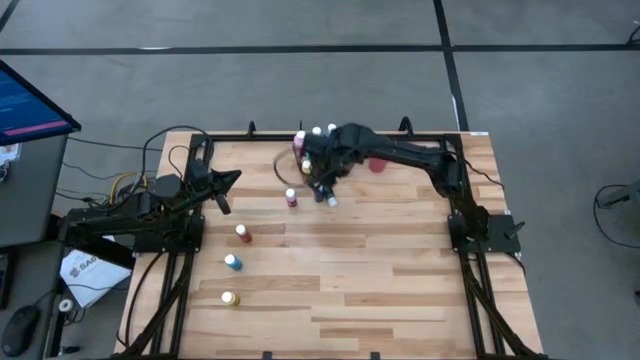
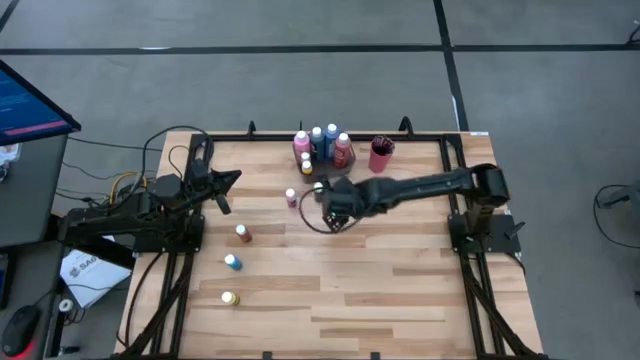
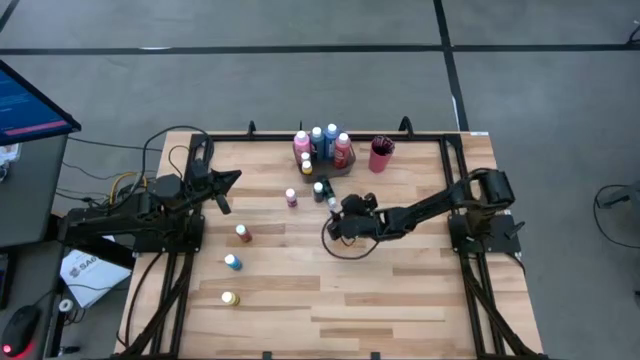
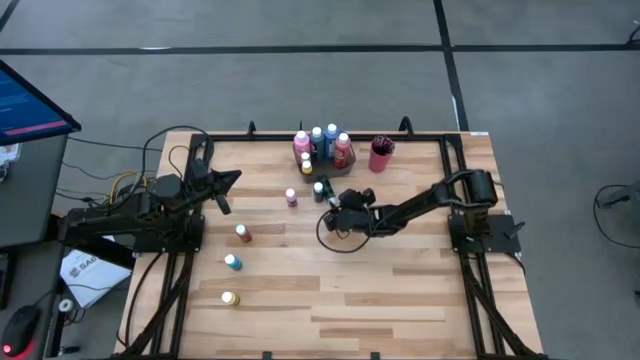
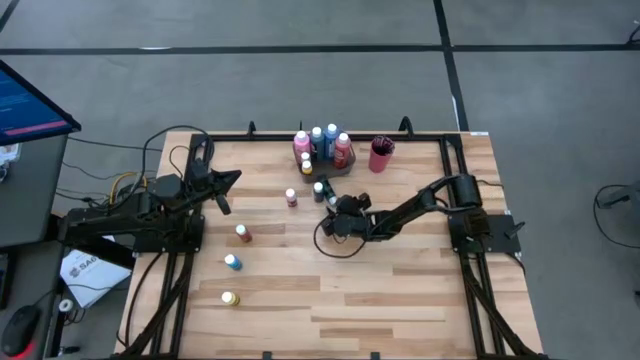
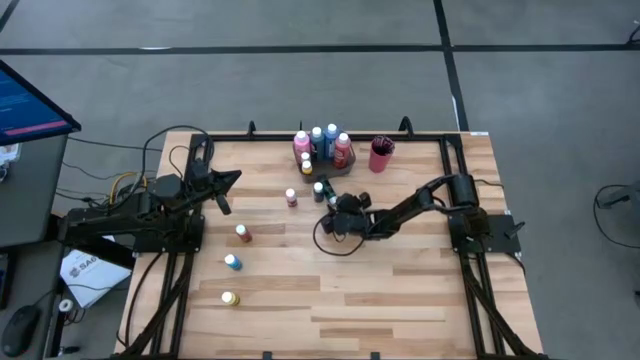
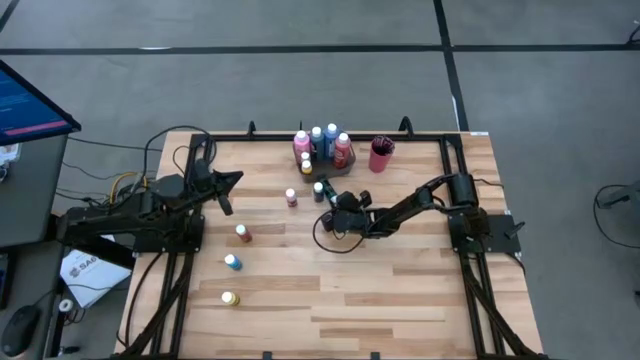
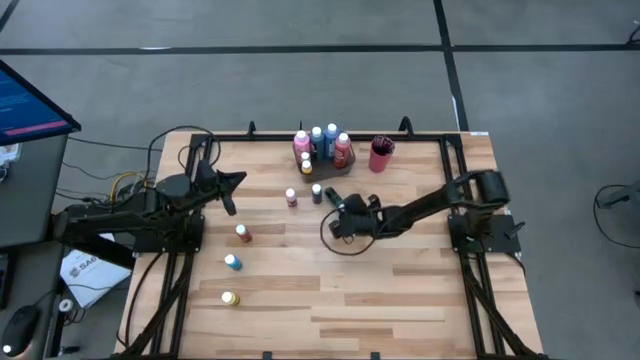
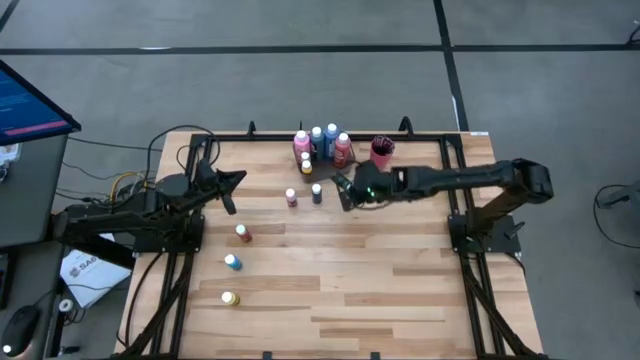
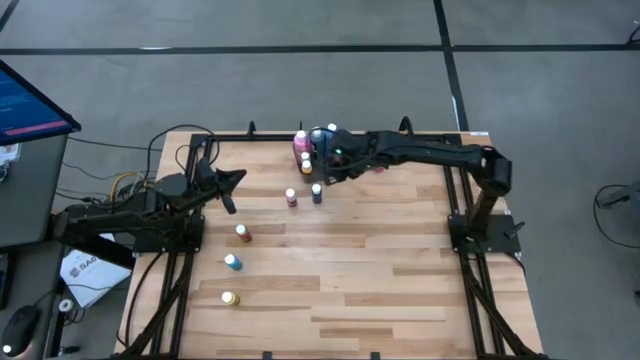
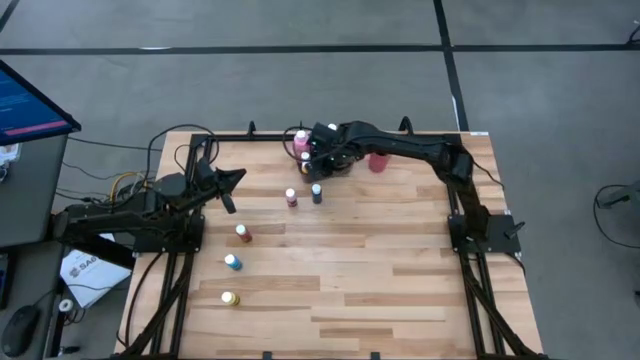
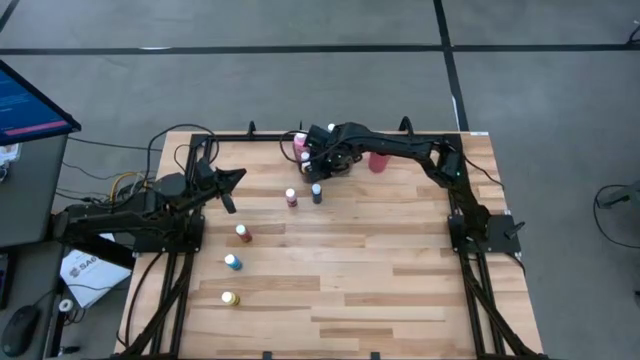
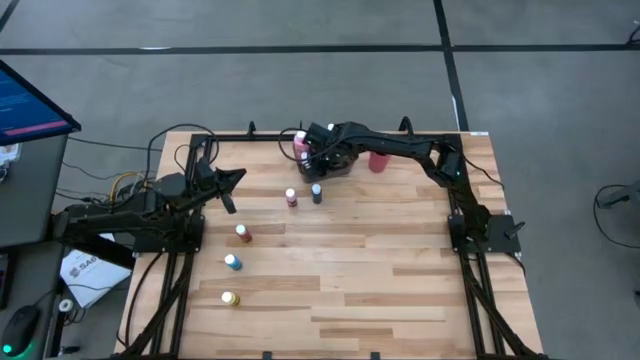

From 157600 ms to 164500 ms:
Task: Pick & Place Paint Supplies
Put the dark green paint bottle into the gray bin

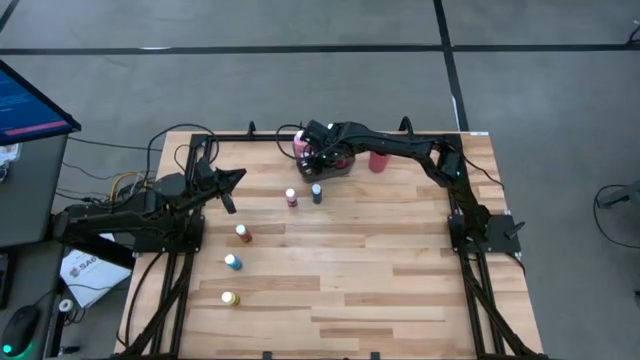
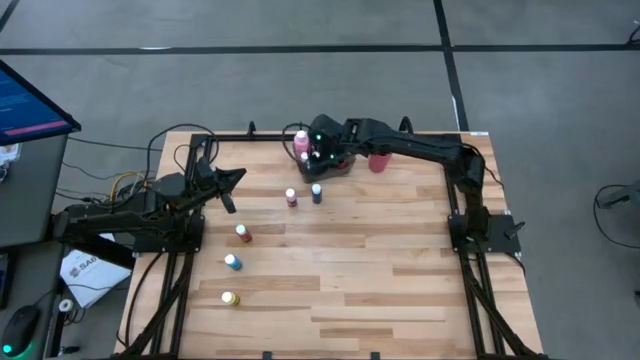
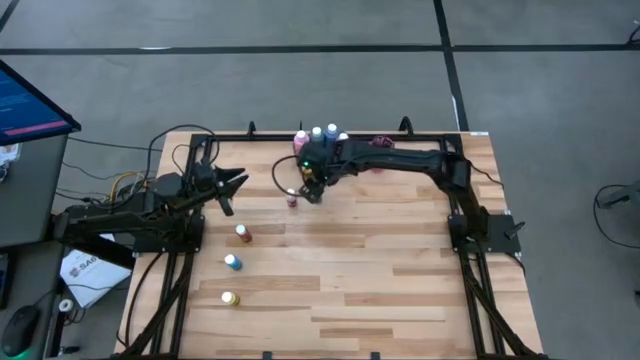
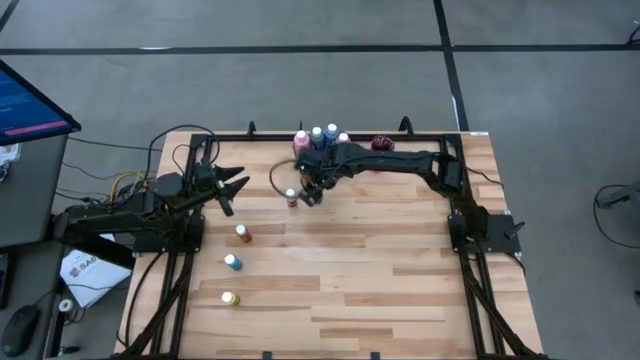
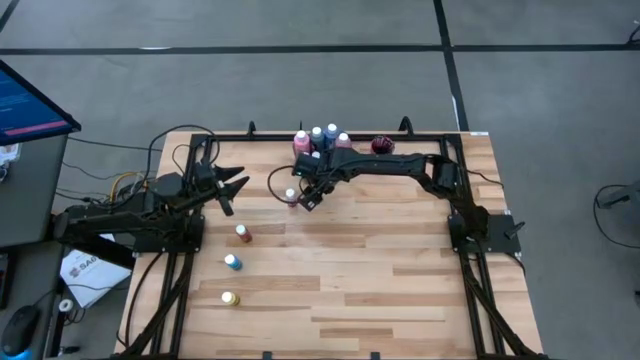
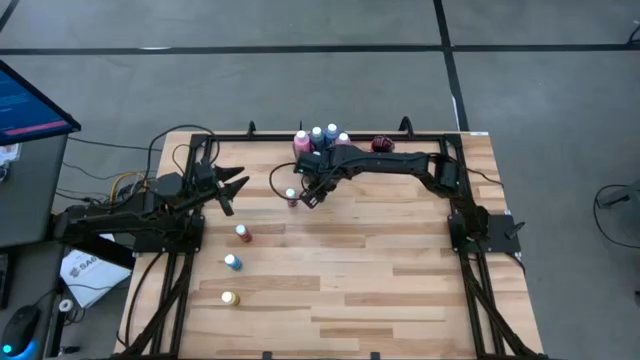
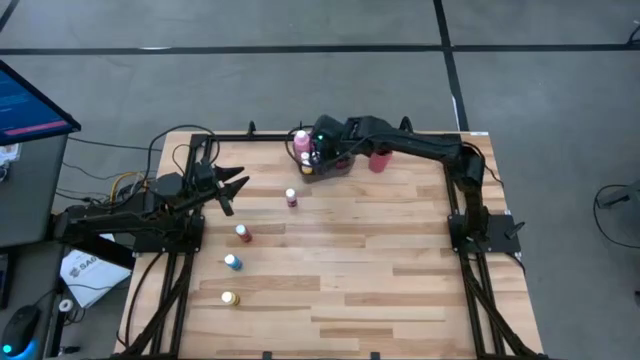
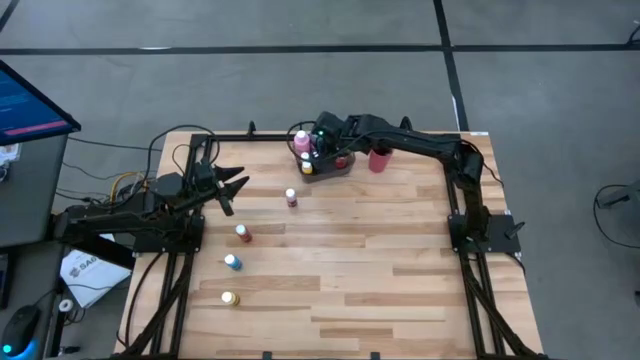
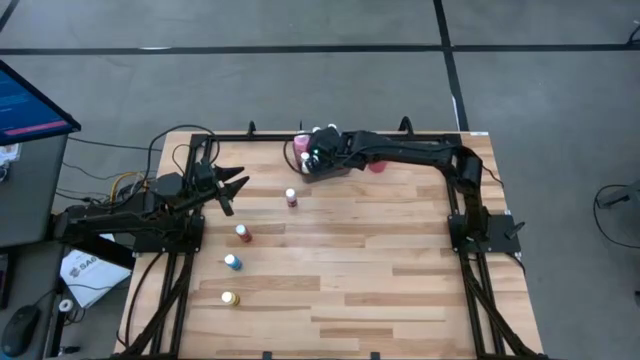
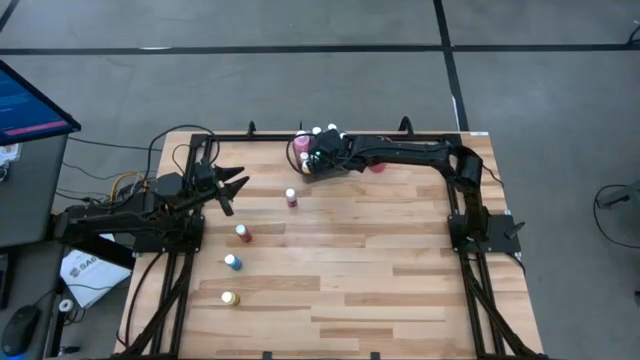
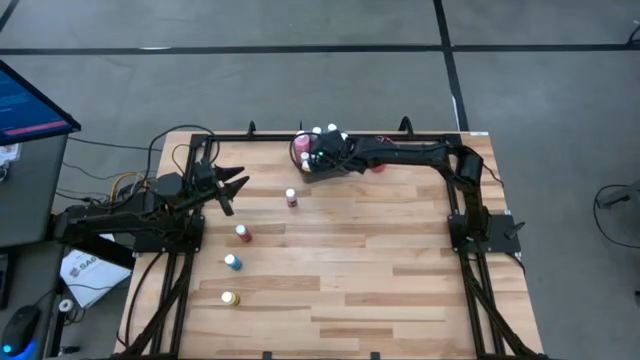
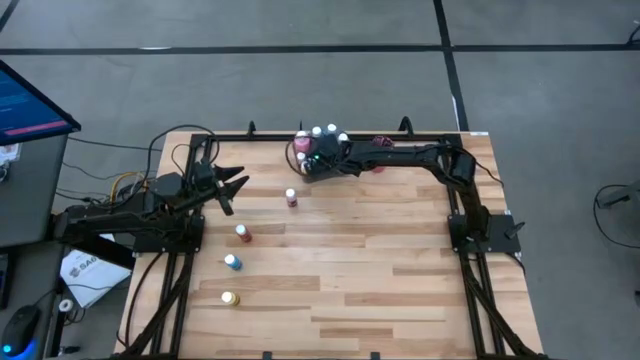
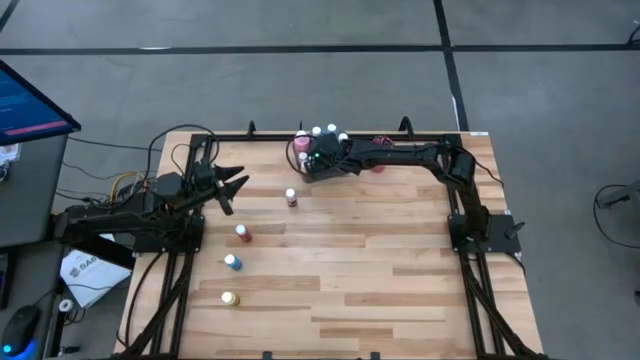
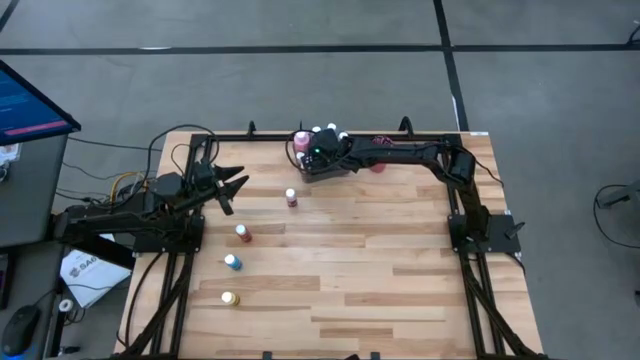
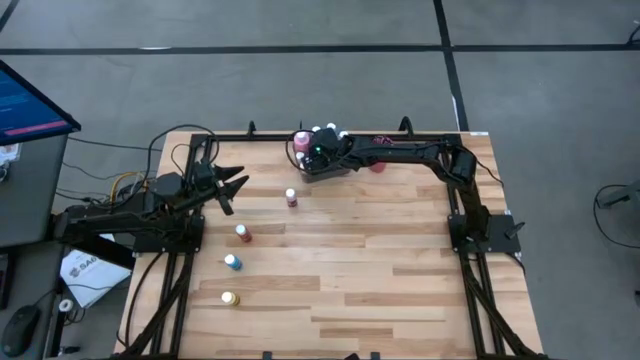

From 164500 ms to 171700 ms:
Put the blue paint bottle into the gray bin

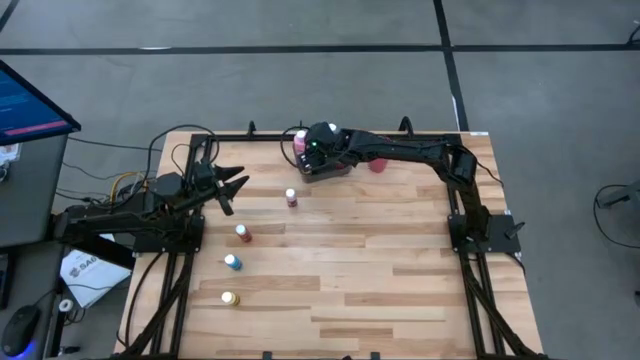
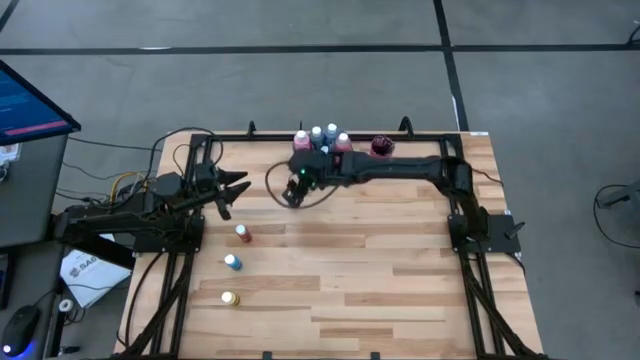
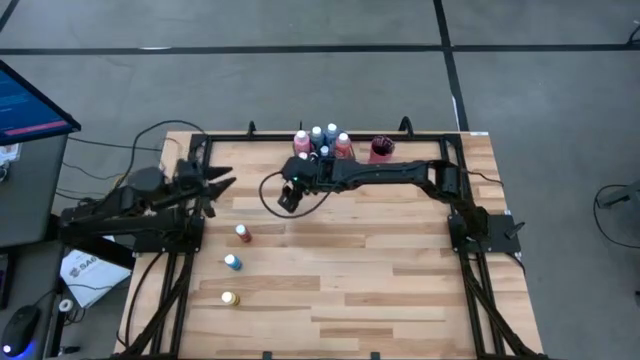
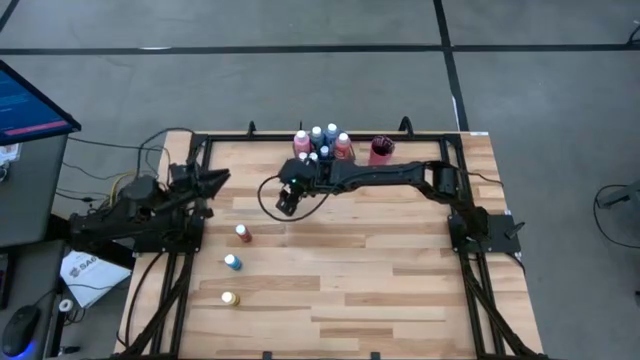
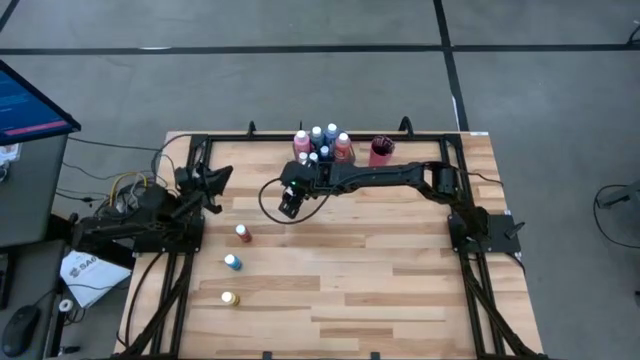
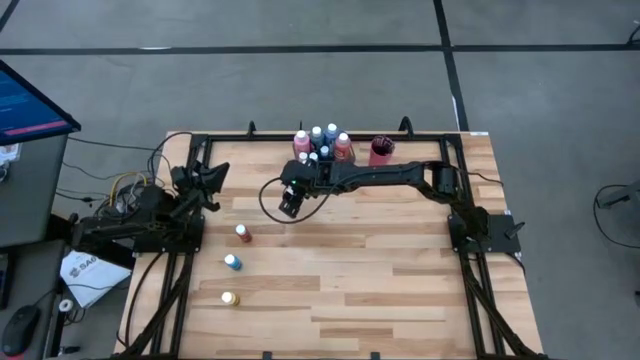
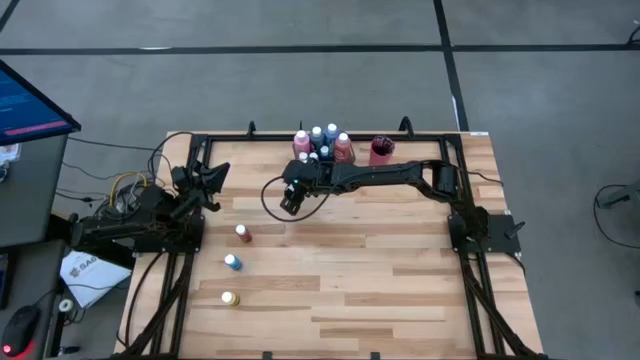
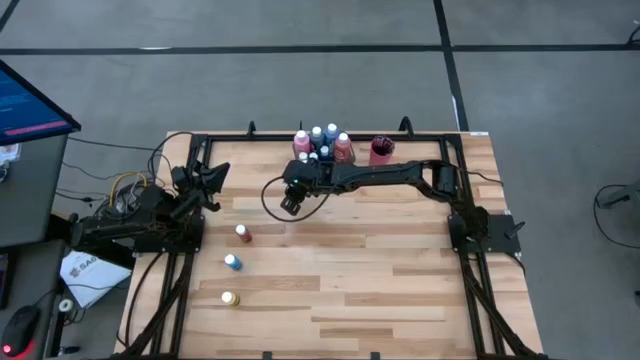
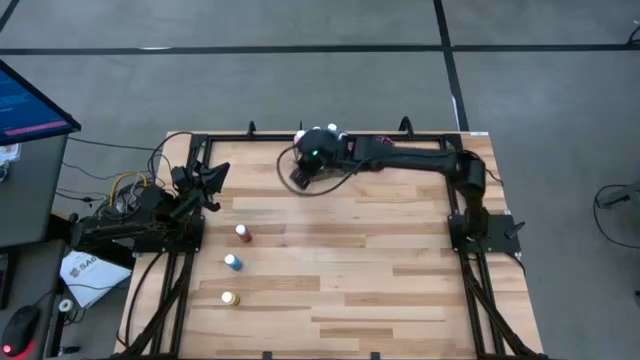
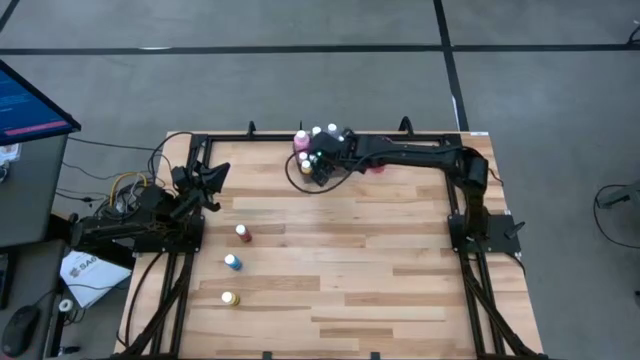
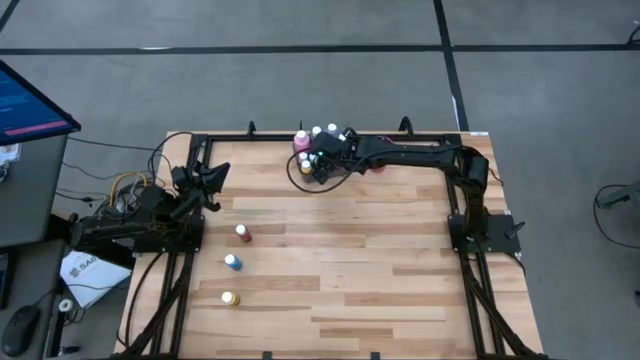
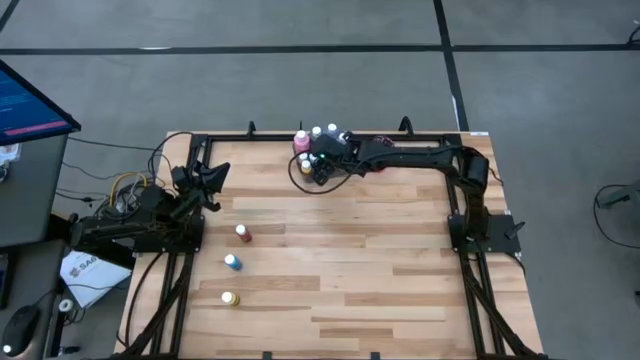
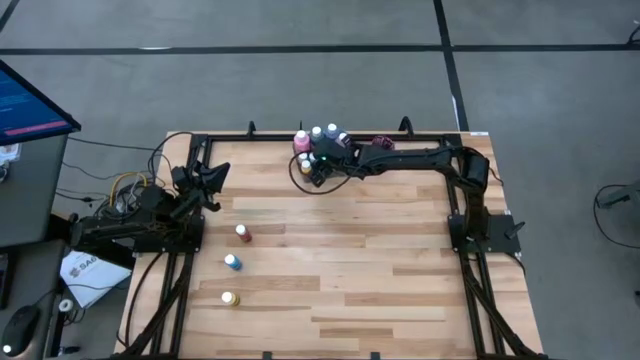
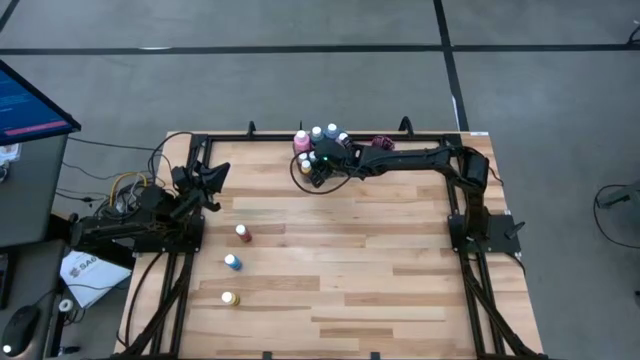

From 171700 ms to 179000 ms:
Put the pink paint bottle into the gray bin
